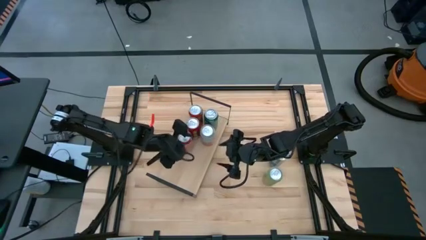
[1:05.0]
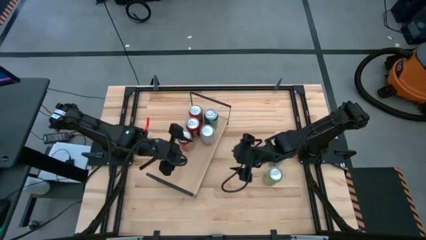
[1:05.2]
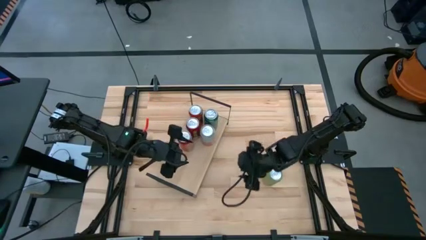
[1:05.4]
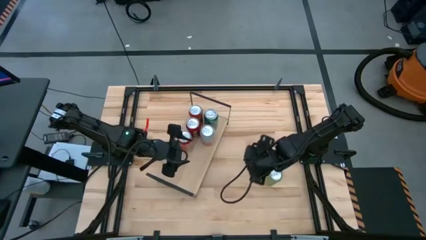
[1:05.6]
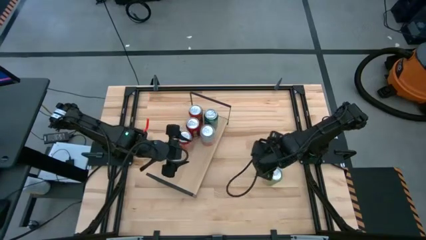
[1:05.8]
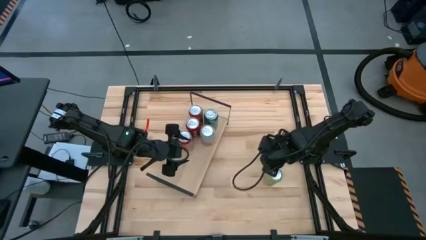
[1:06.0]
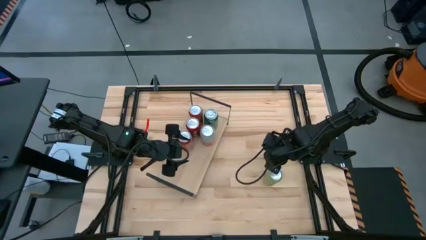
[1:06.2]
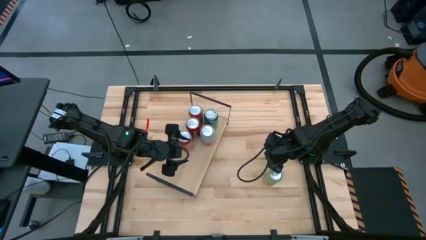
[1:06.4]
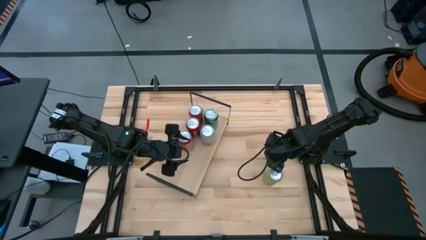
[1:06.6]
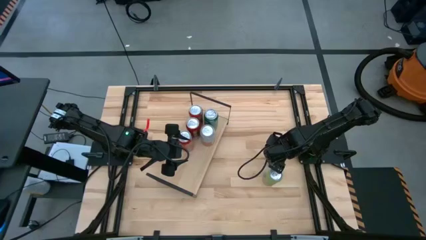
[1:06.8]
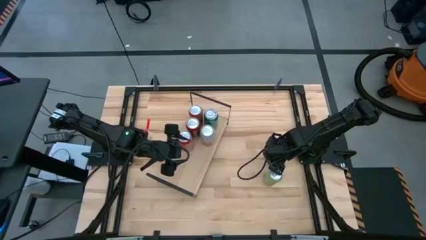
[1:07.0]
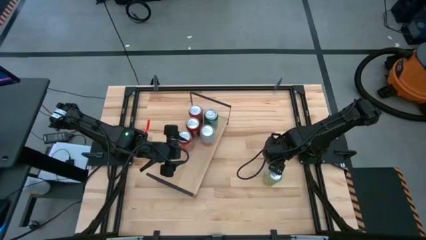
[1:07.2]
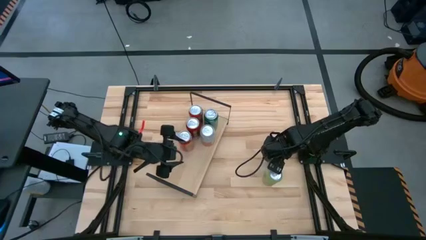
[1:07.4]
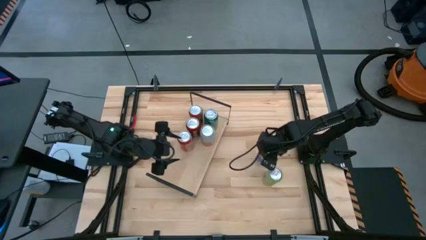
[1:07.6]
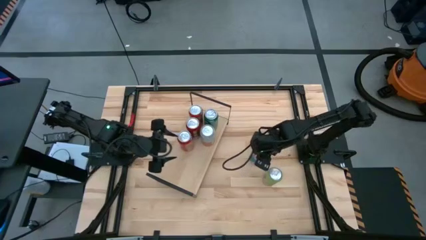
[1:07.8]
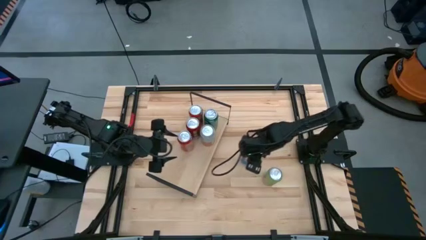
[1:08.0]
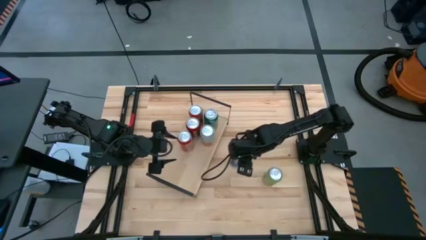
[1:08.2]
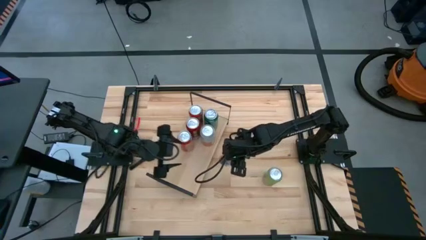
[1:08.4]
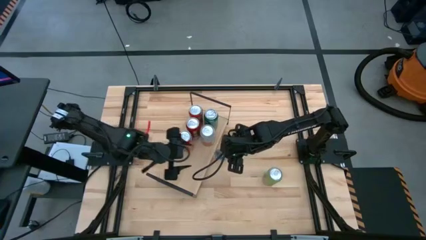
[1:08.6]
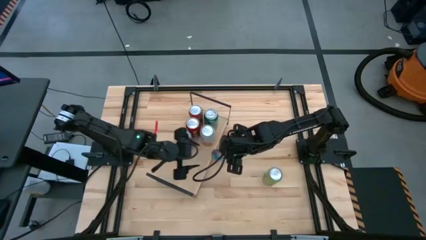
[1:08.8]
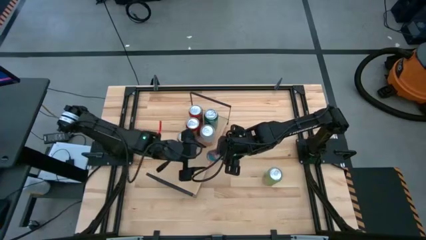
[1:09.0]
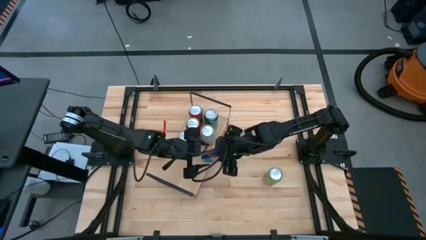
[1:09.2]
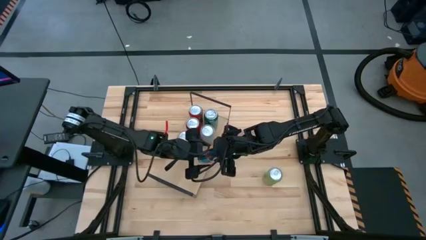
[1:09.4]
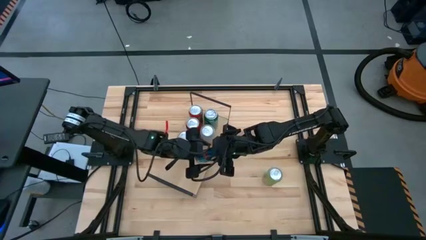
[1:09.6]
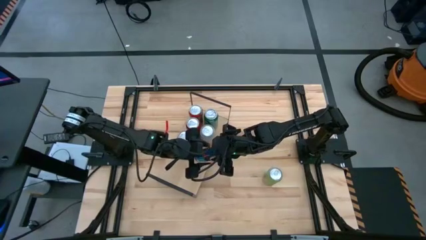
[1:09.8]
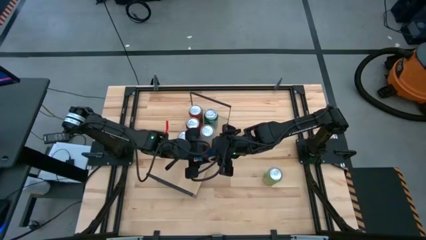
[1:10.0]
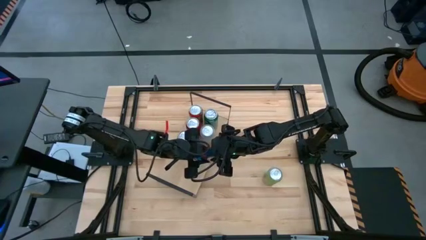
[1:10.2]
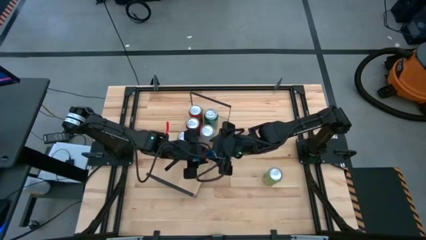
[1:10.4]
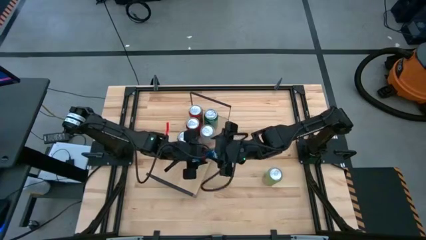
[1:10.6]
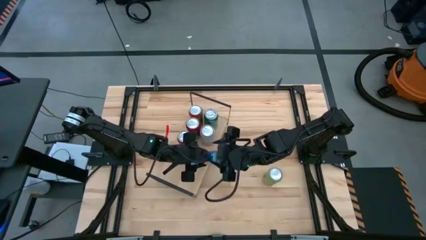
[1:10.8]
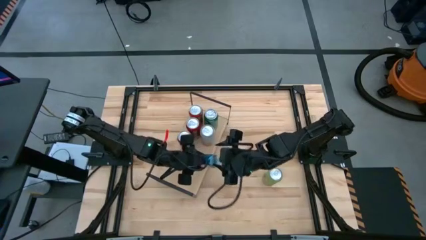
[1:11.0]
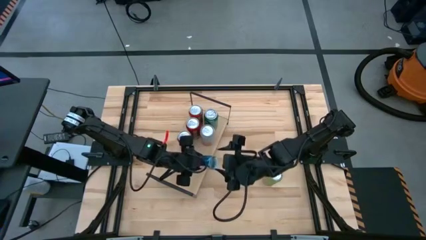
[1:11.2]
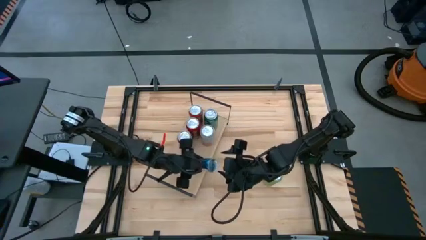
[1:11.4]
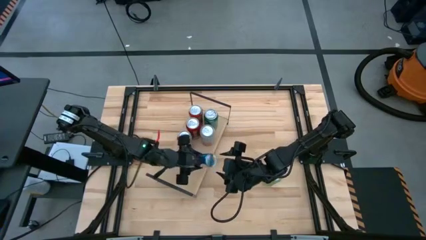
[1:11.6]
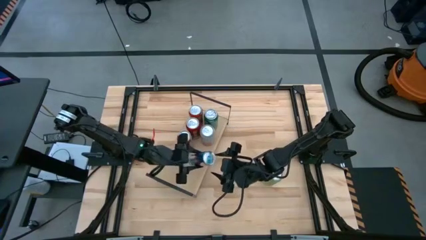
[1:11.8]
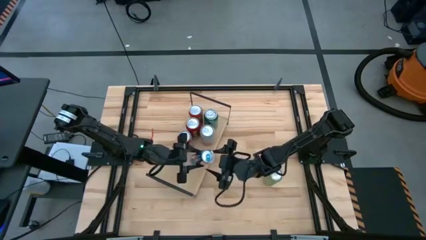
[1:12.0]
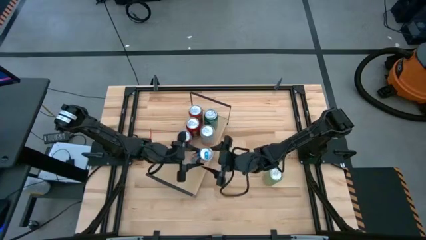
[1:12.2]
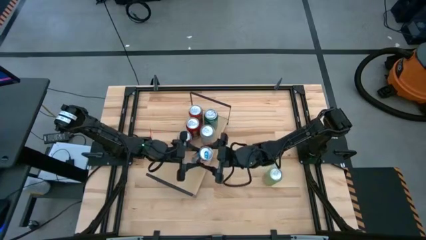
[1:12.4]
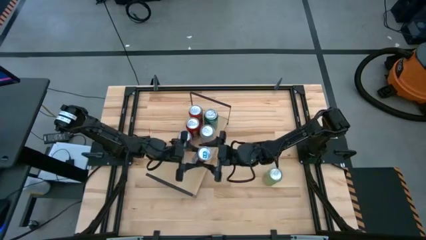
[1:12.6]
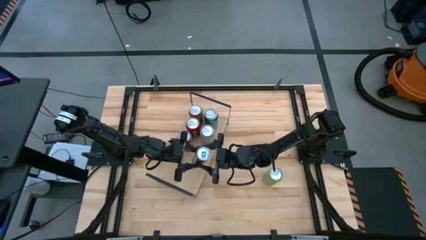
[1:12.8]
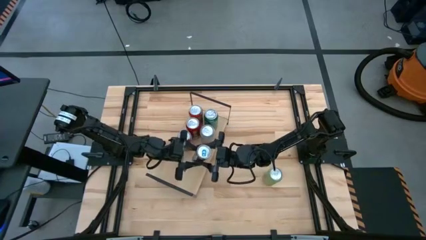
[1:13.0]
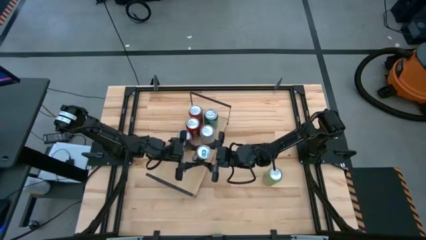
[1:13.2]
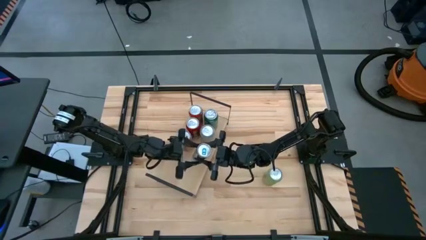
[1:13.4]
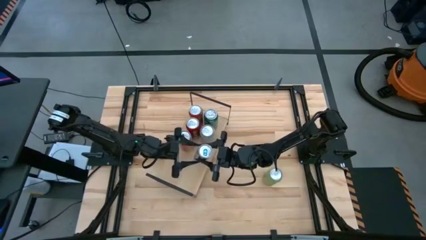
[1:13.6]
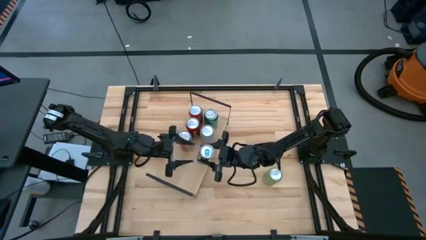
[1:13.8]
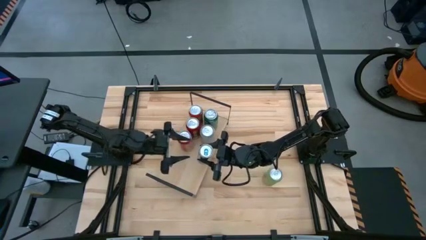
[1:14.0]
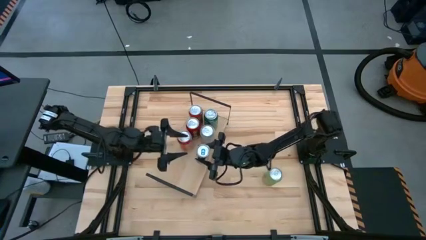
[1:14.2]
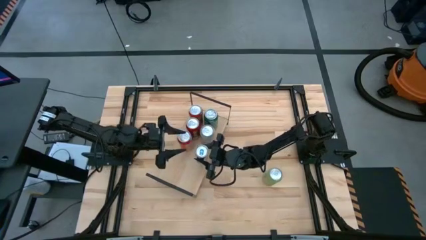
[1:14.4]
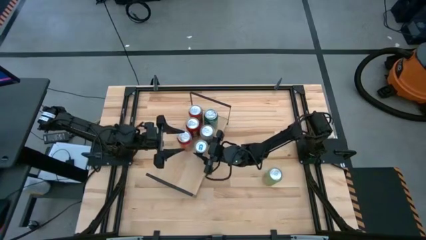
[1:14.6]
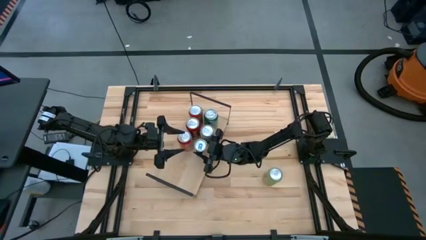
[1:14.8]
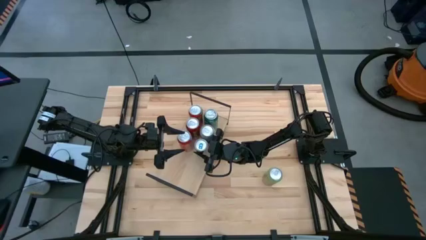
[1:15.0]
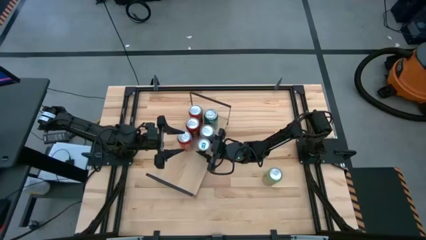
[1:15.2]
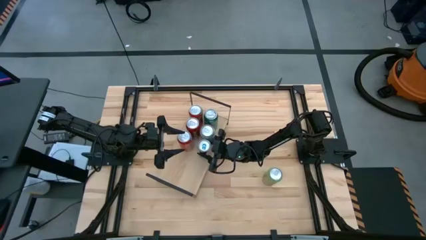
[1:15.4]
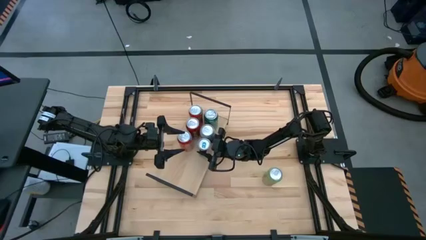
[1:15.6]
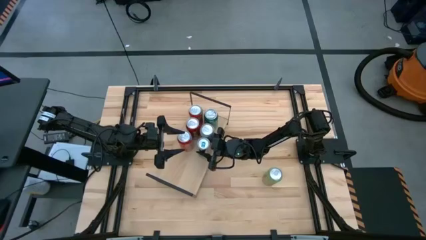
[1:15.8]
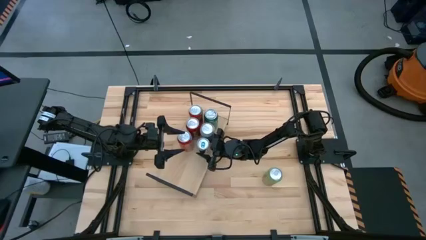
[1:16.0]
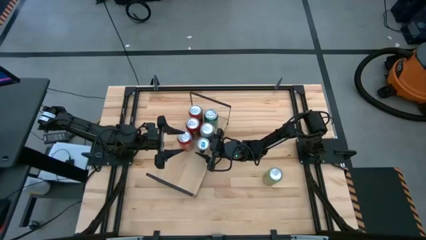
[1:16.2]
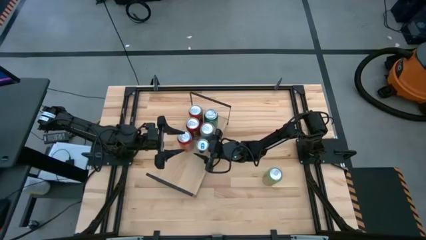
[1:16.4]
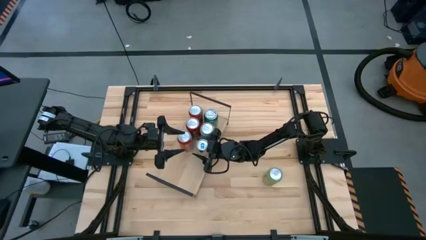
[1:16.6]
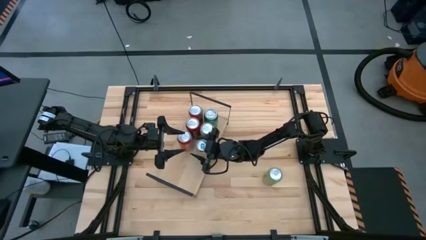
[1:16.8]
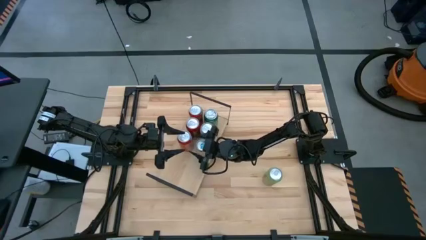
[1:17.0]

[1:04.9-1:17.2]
Task: Place canned beverage on shelf
Put the blue soda can on the shelf
